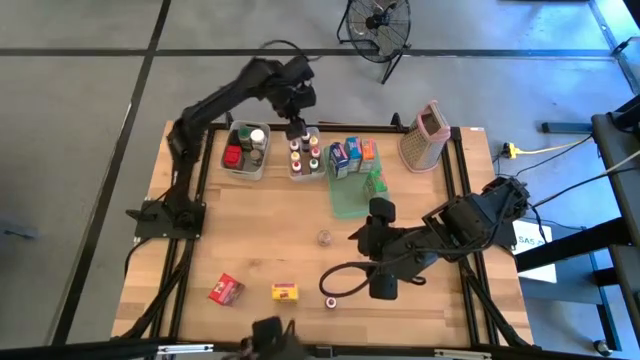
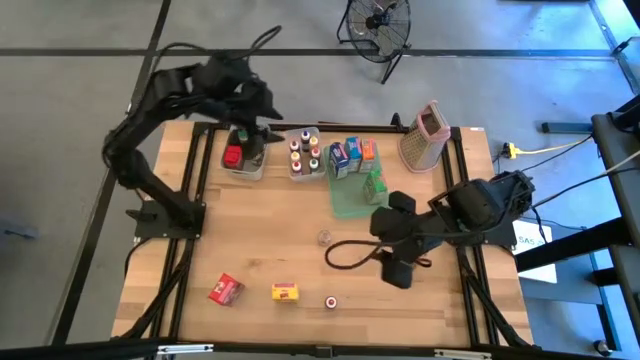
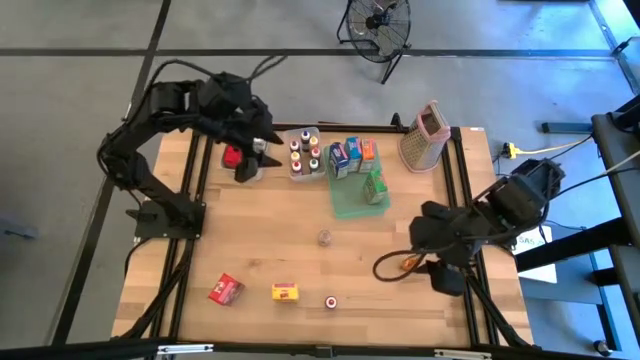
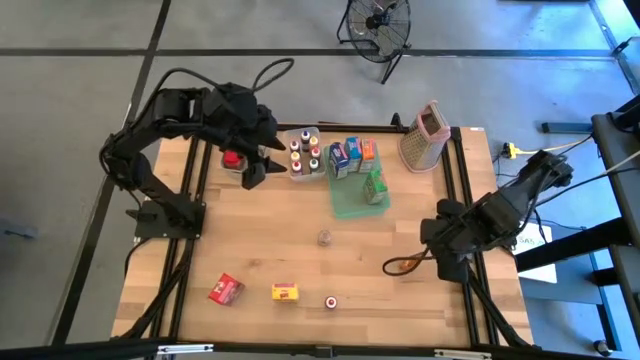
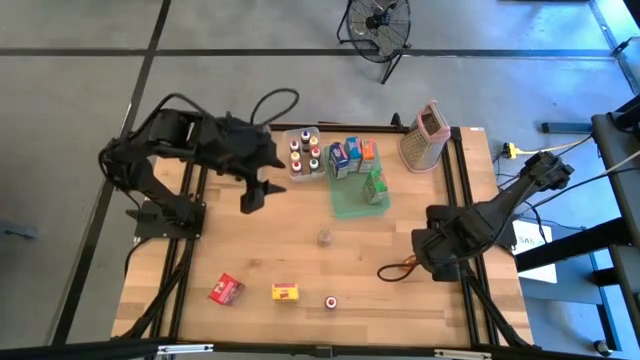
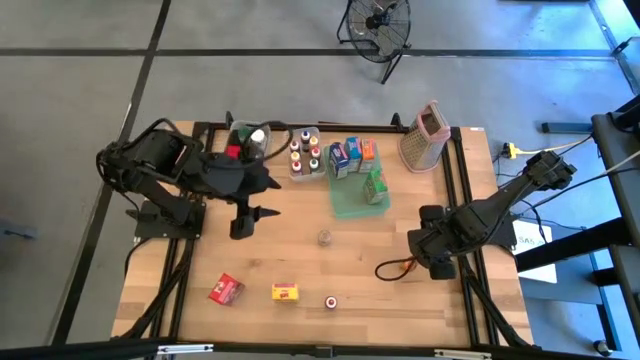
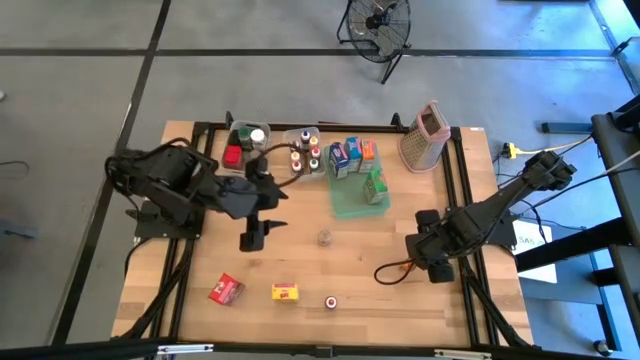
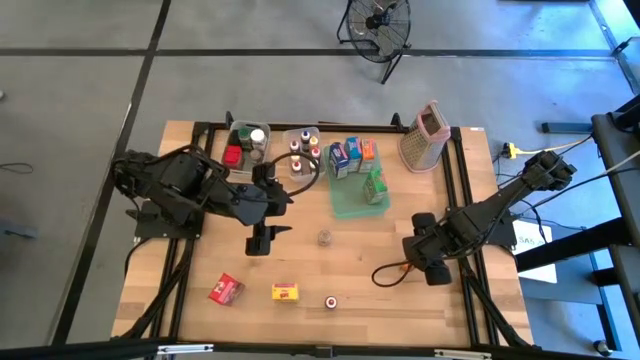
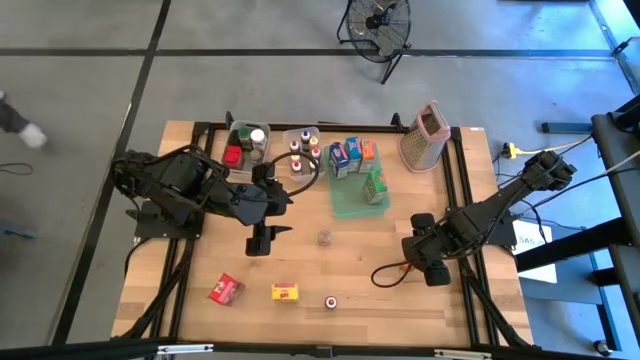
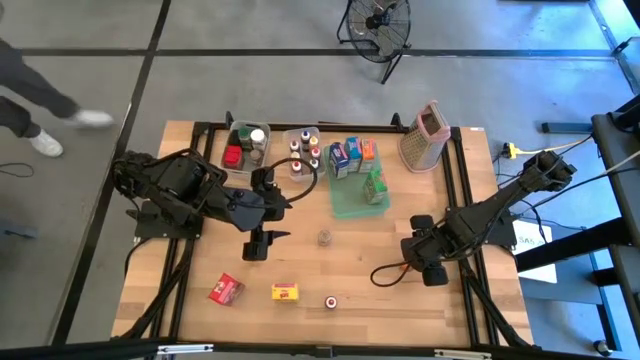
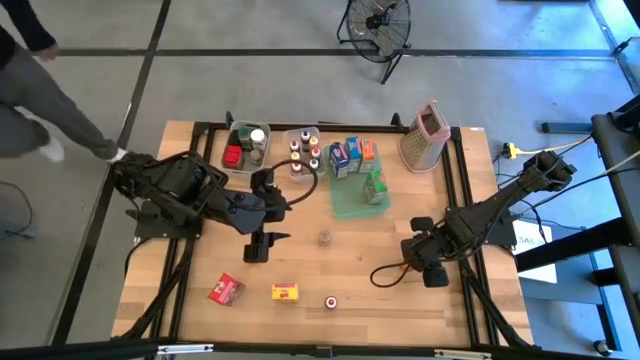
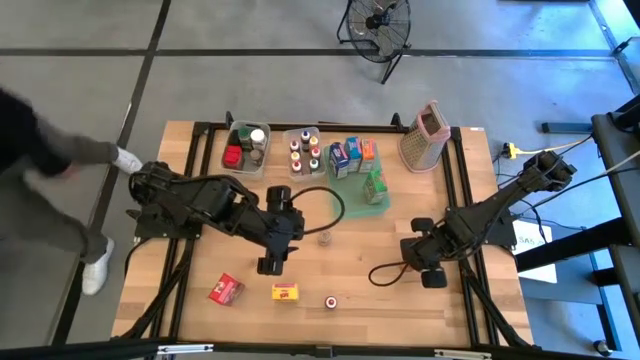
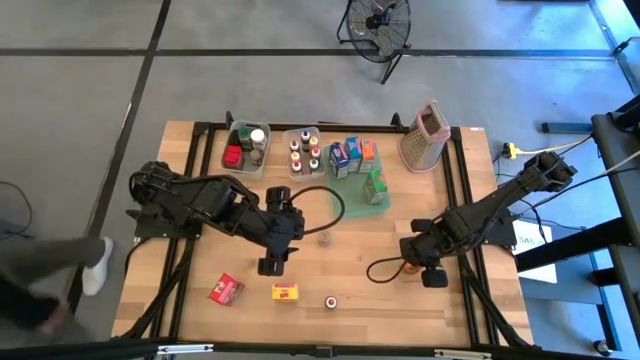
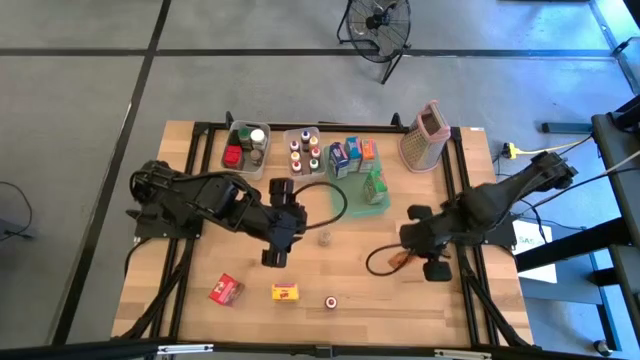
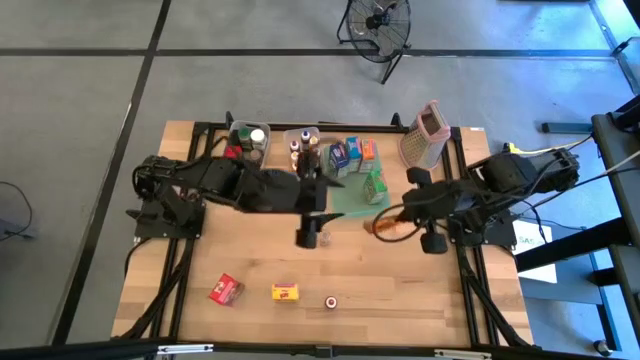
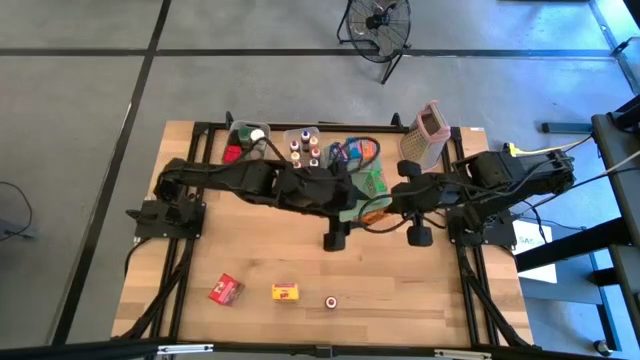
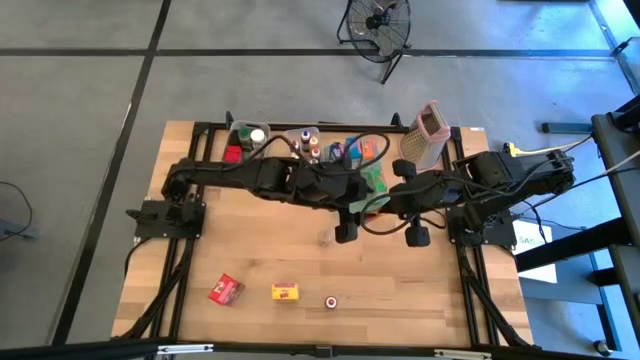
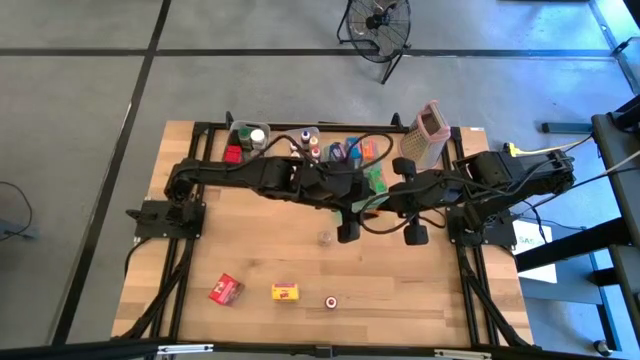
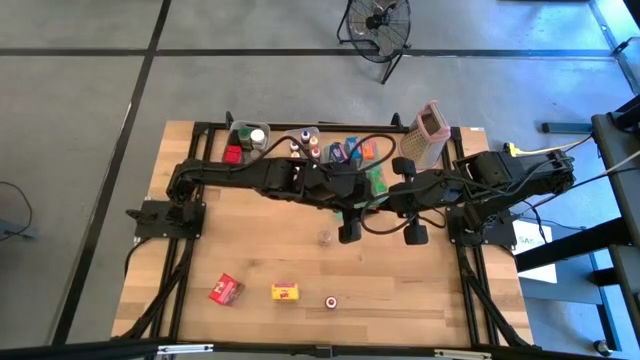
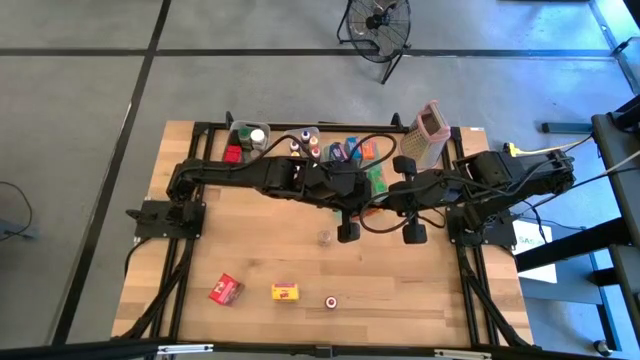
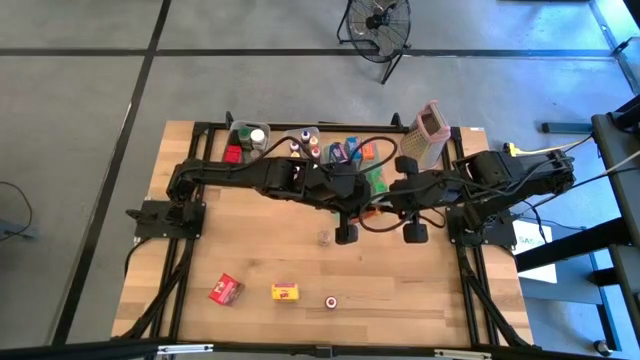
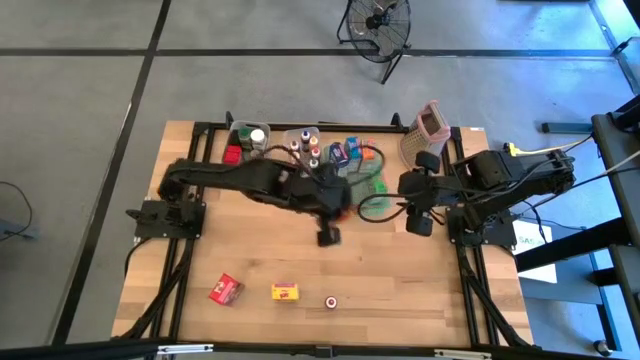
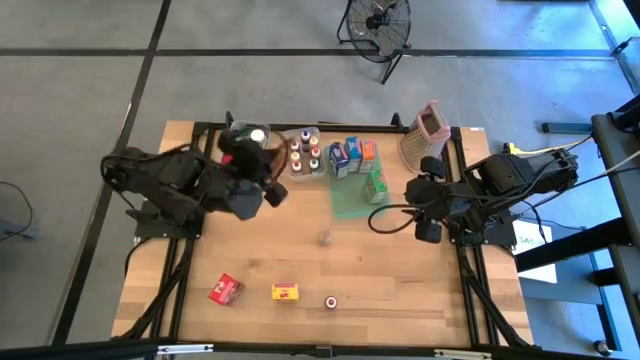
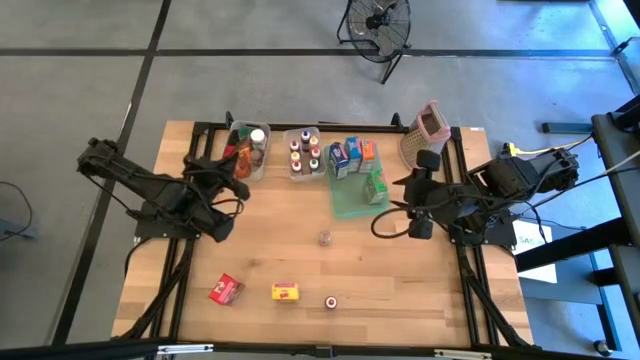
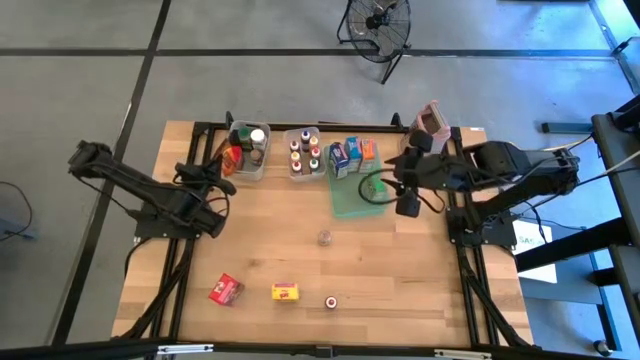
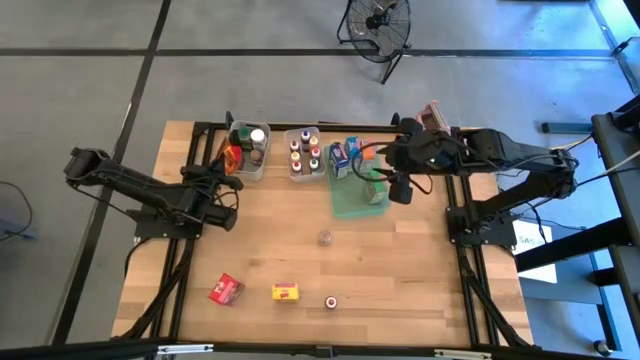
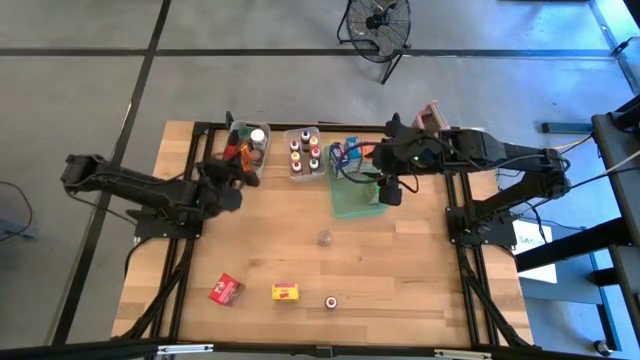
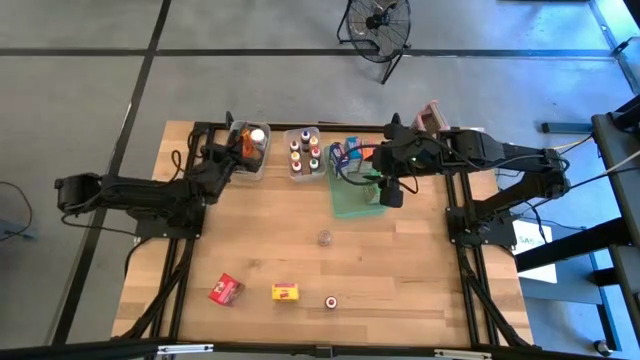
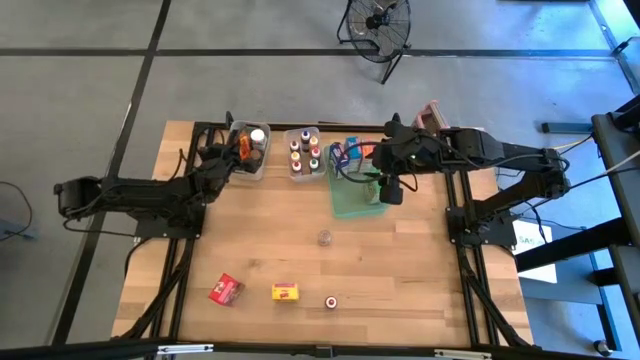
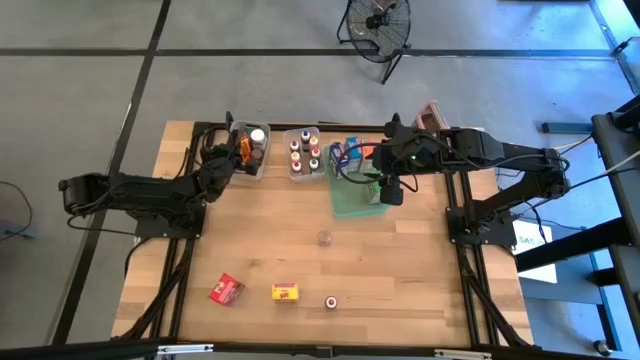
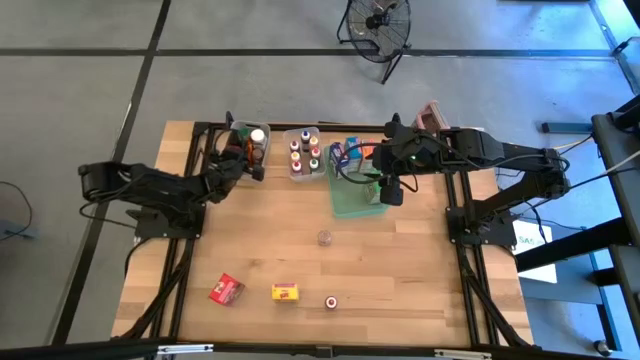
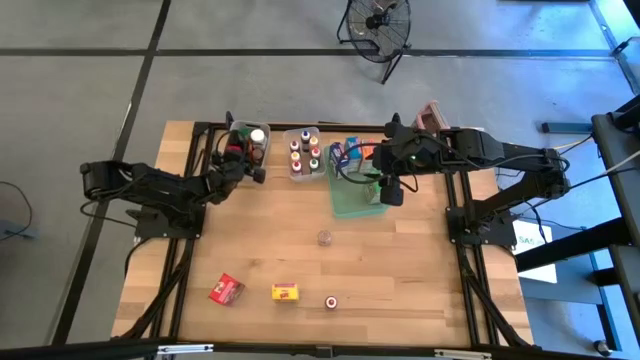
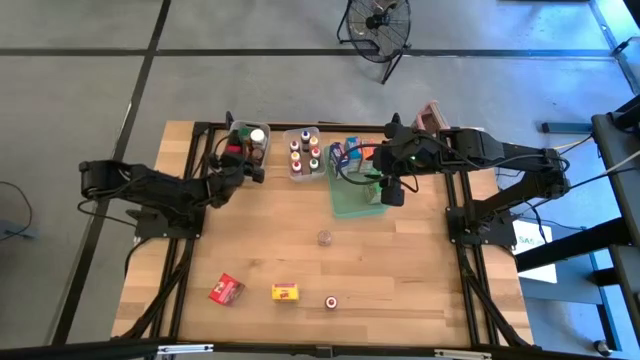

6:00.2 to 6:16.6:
Task: Pick & Place Kitchen Items
Put the orange spice bag into the gray bin

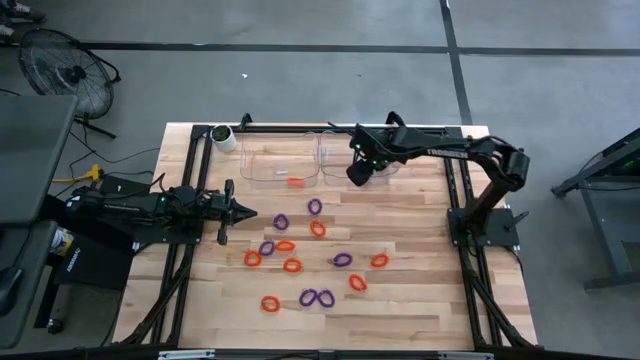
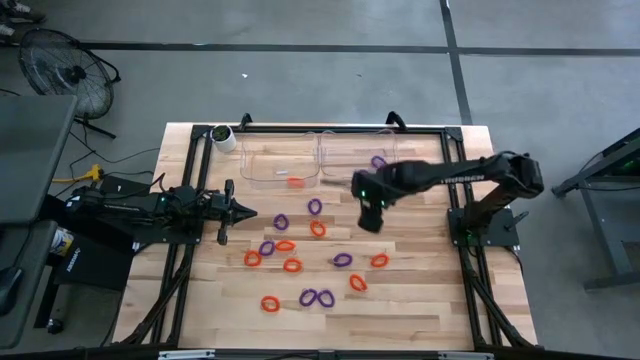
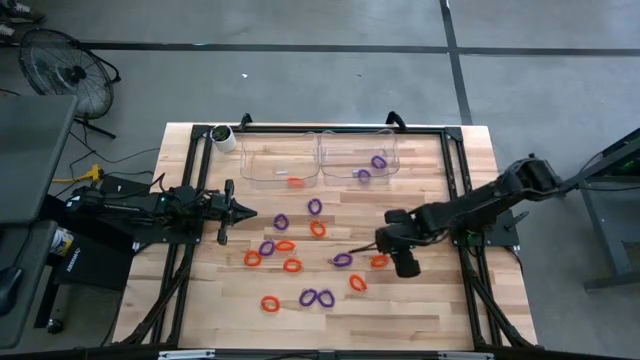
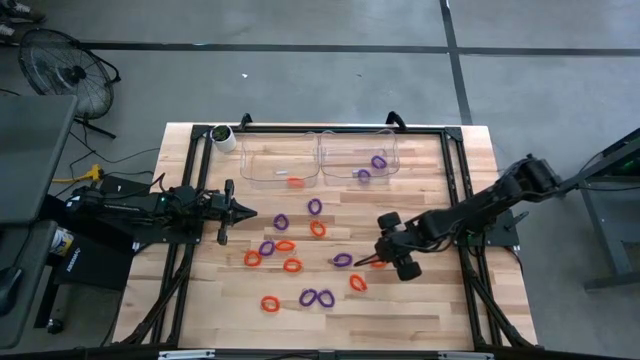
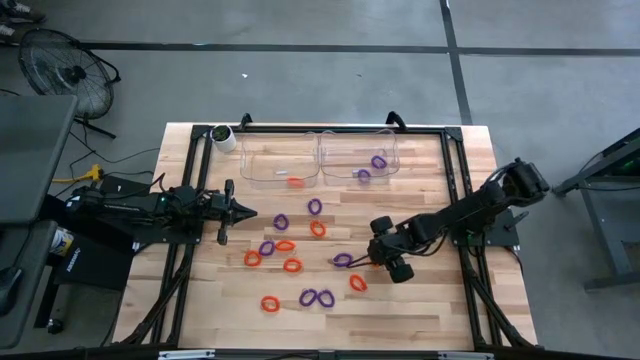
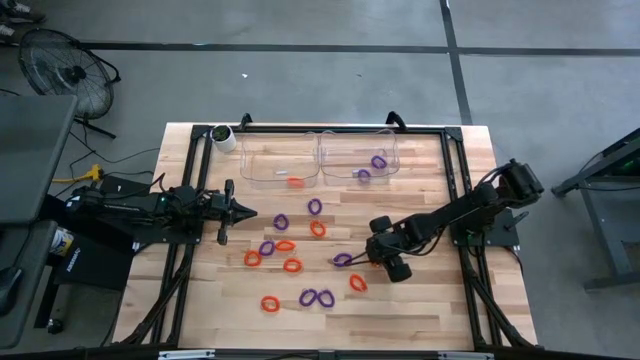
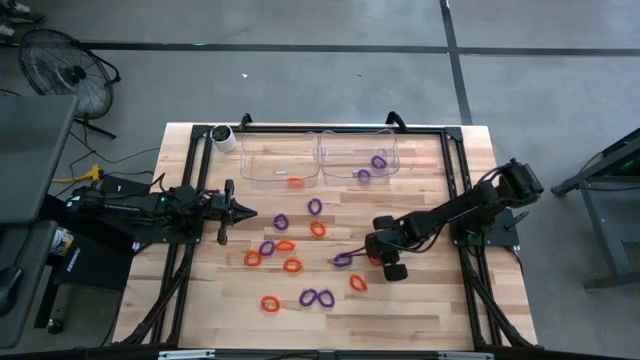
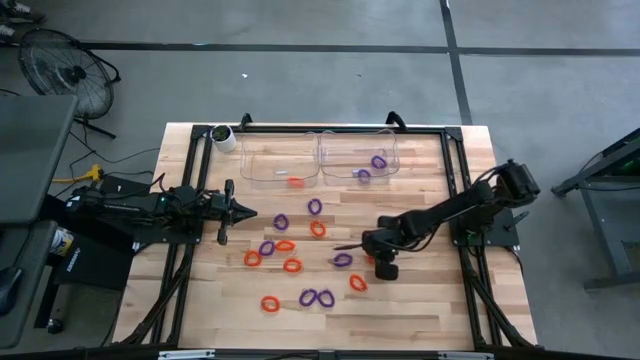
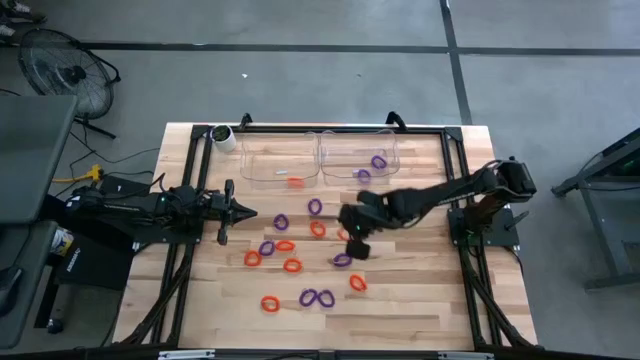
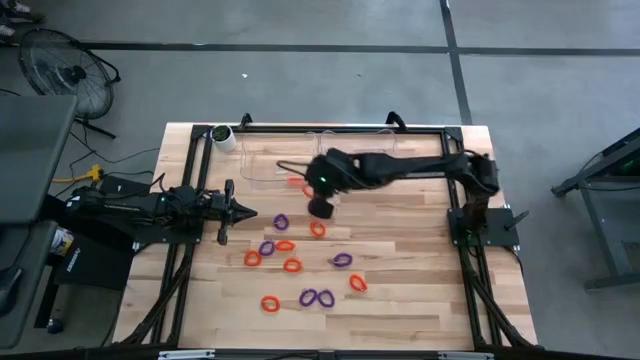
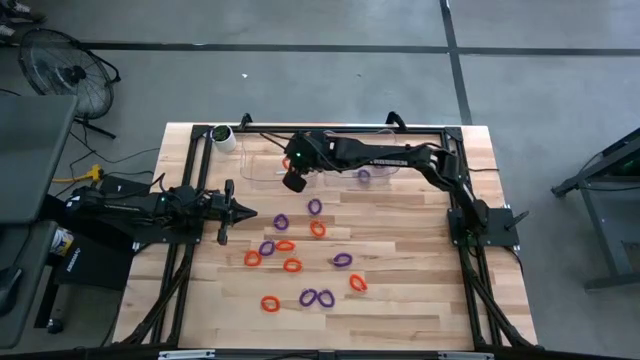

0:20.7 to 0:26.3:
Task: Sort spring keychains
Put the orange spring keychain into the left bin
